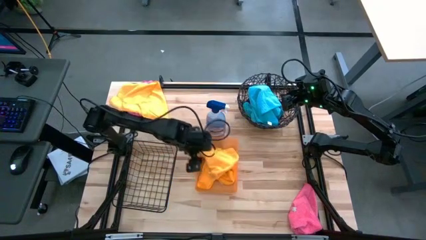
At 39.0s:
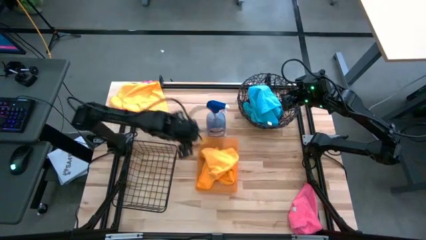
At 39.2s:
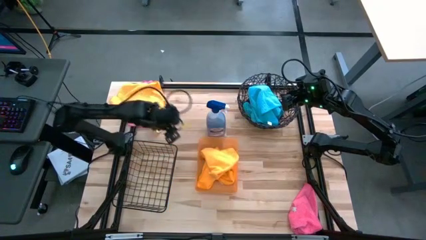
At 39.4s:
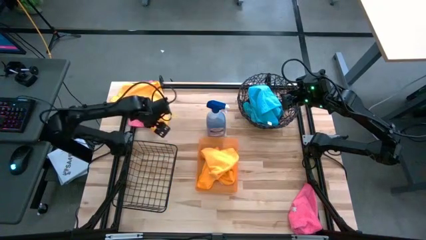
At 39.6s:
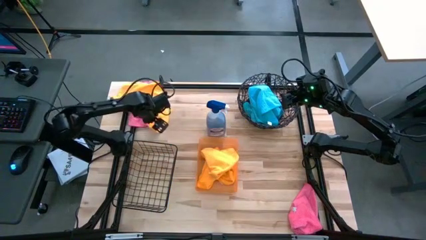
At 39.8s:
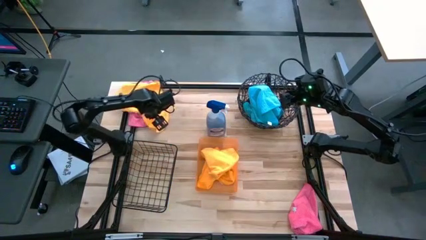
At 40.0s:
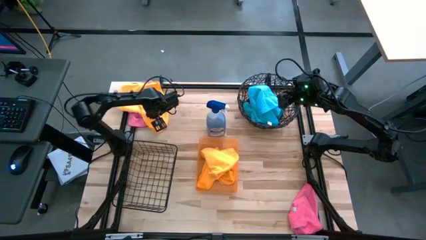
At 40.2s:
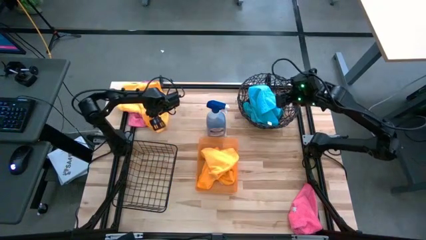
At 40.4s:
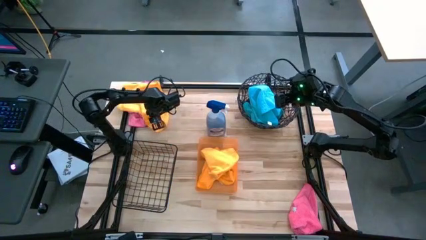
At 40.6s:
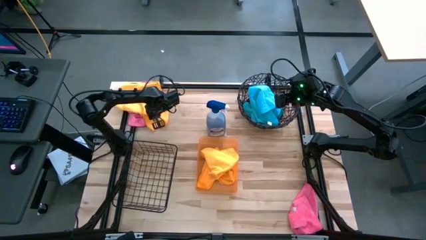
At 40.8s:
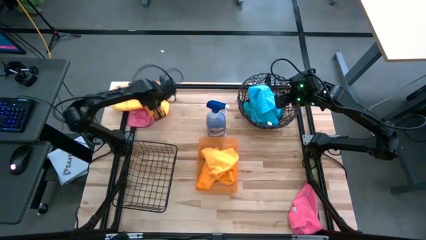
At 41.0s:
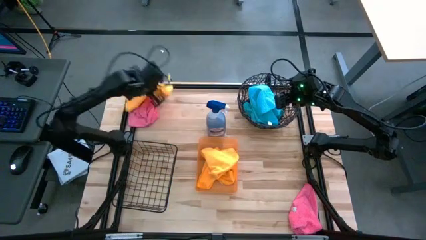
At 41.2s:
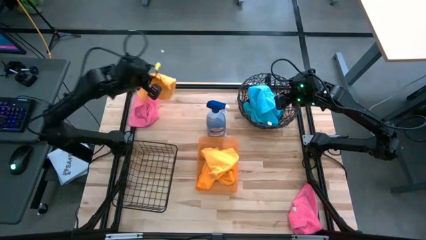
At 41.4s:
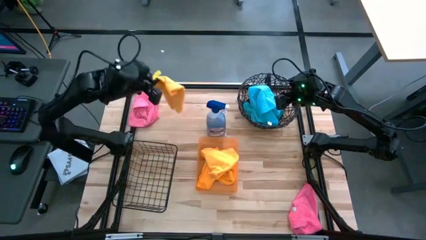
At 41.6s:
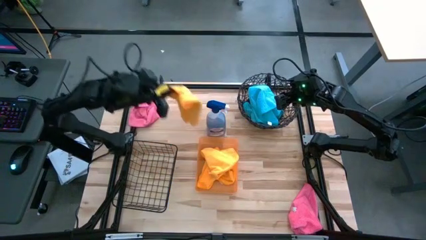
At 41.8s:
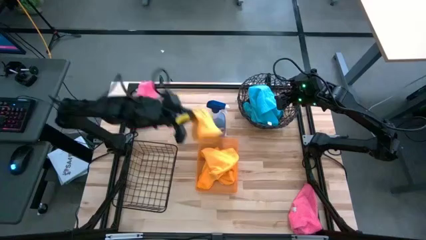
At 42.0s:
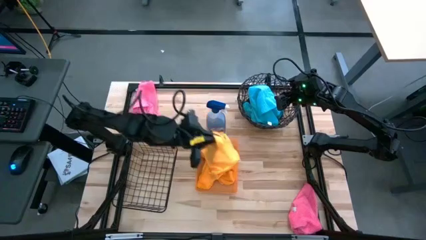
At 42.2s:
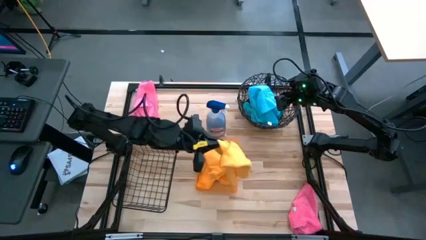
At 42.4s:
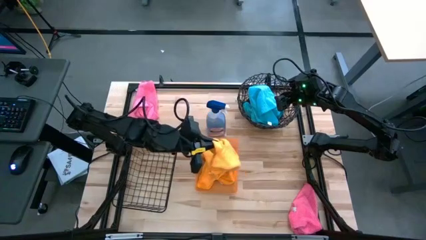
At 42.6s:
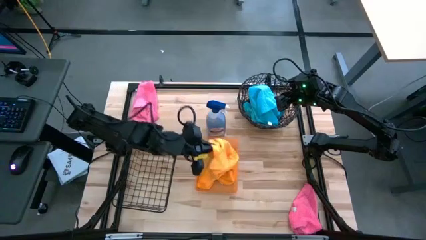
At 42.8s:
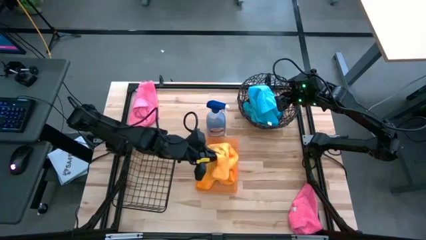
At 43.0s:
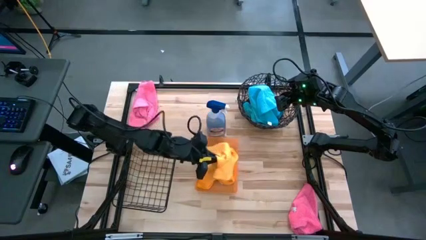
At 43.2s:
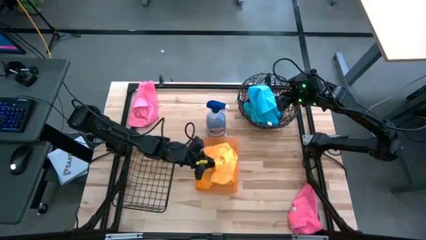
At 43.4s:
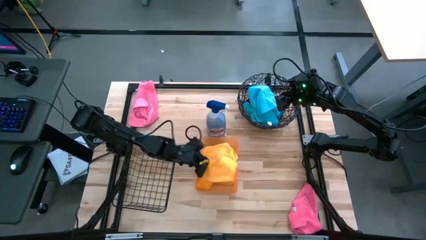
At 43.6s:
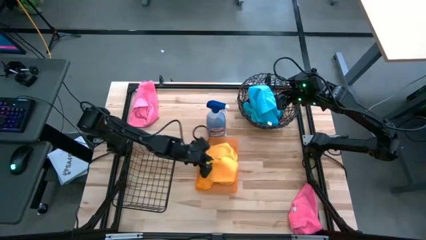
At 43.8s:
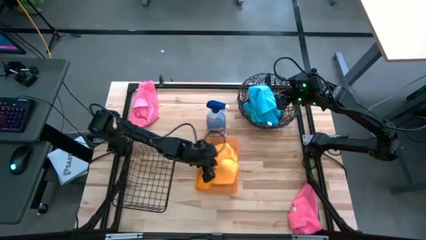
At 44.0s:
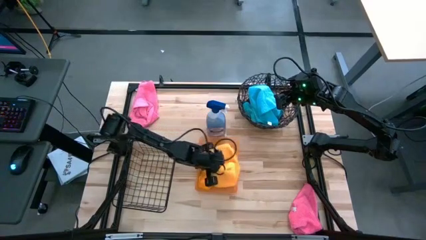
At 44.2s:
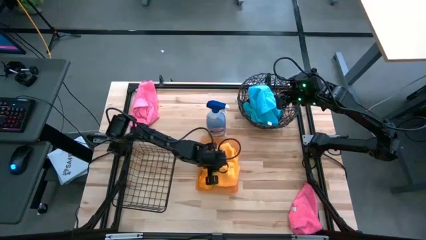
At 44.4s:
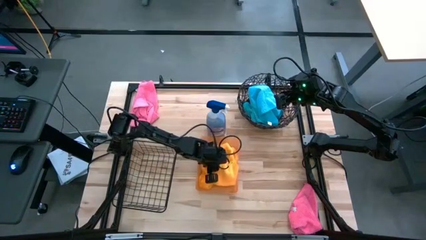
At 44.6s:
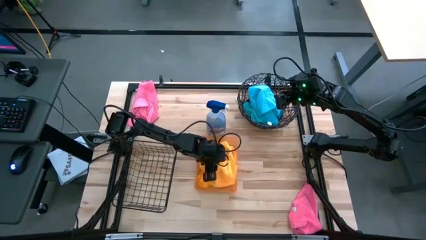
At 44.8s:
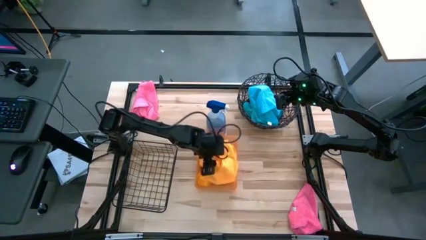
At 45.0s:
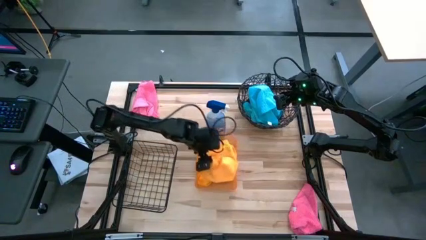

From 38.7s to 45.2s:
Task: Sort microfiber towel by color & place in baskets
Put the yellow towel into the orange bin

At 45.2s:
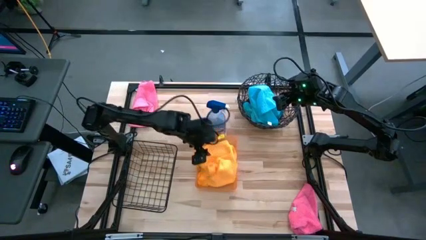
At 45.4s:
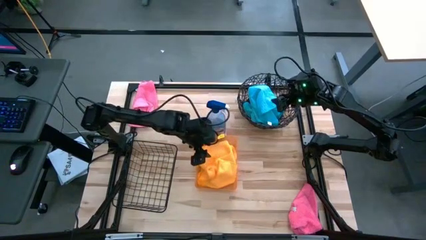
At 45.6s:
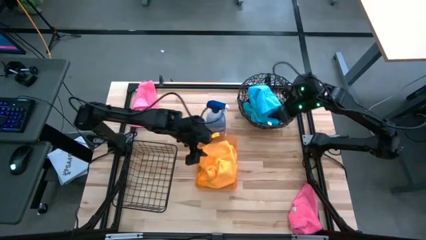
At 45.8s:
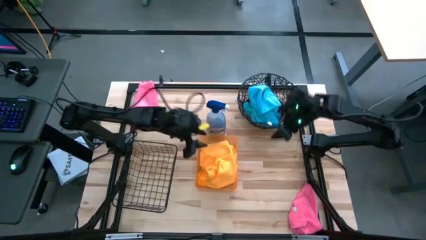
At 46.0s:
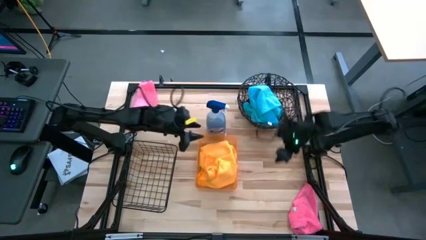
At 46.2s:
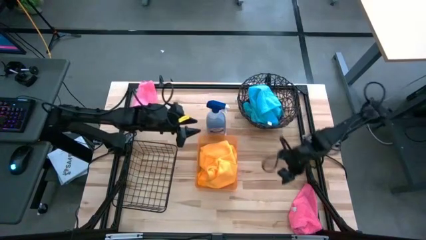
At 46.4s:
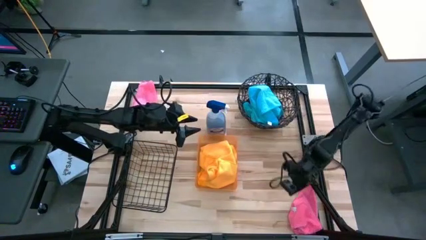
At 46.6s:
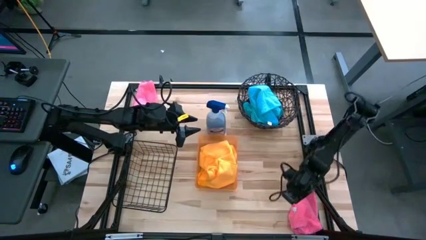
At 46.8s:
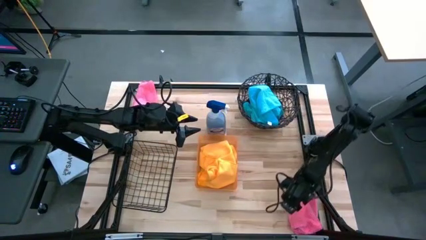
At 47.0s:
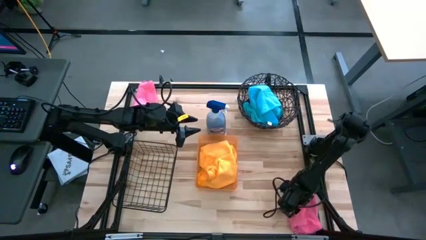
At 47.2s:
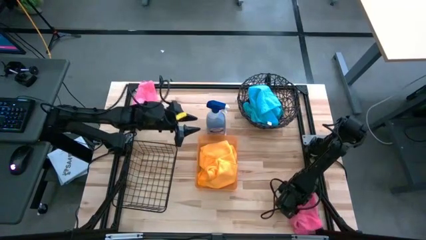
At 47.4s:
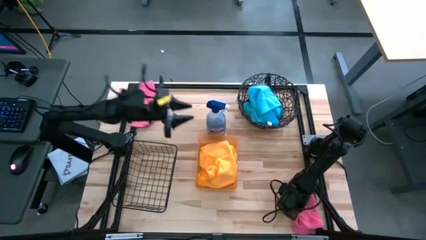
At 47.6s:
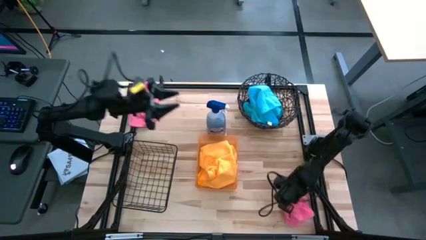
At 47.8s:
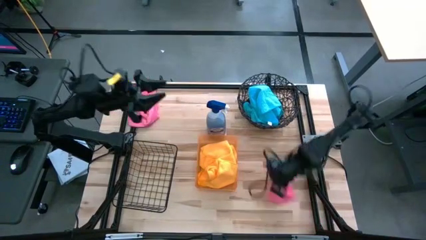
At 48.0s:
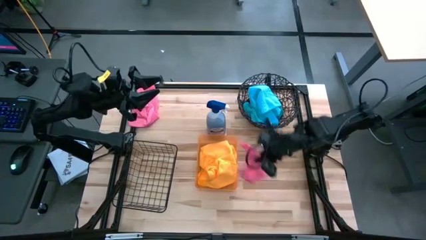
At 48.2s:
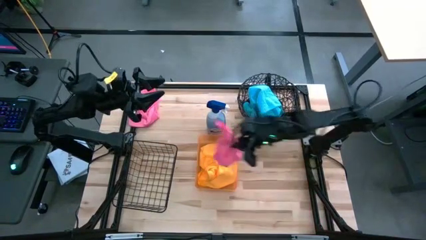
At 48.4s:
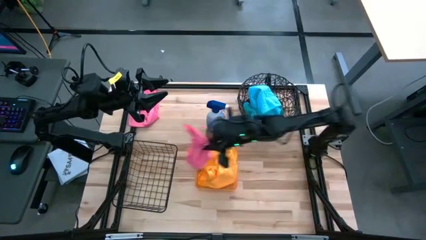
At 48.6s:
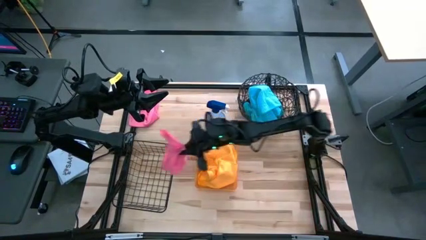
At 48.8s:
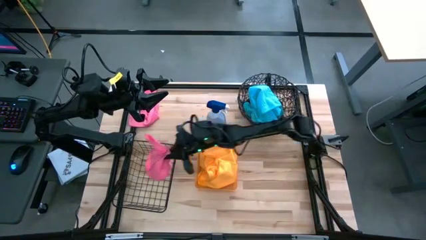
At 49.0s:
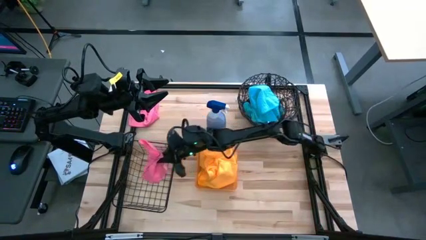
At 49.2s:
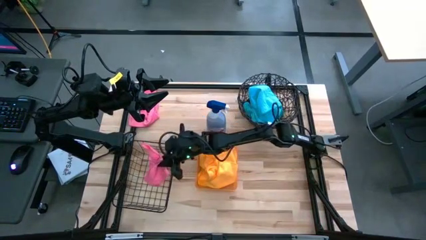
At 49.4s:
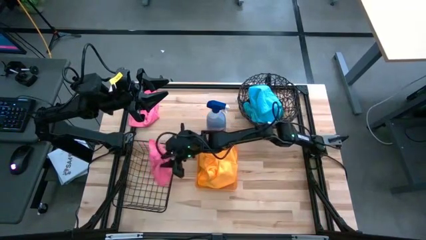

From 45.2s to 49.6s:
Put the bottom pink towel into the black wire basket

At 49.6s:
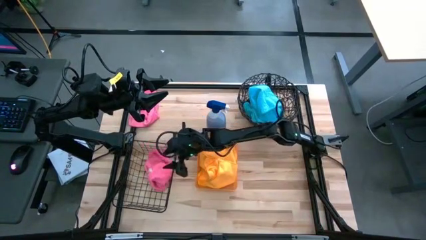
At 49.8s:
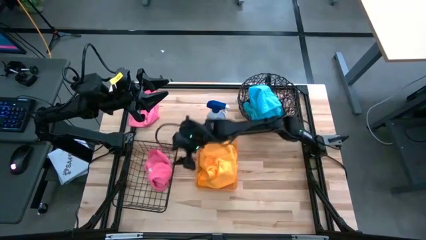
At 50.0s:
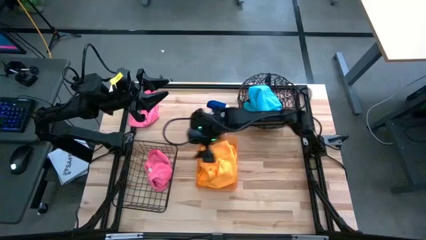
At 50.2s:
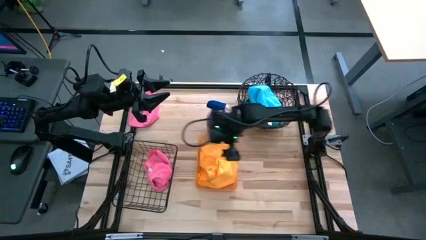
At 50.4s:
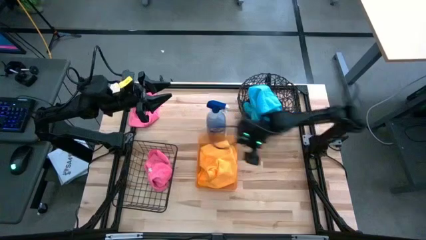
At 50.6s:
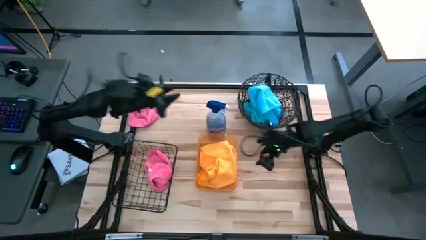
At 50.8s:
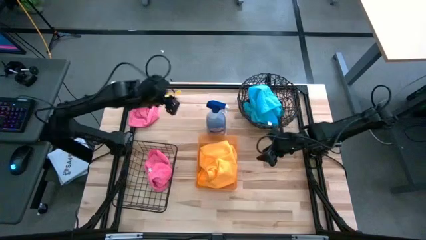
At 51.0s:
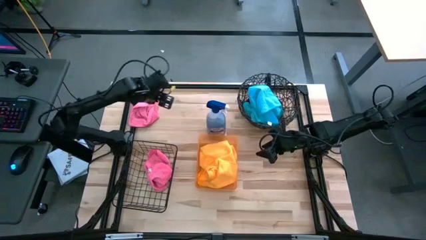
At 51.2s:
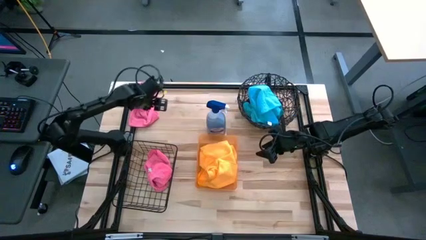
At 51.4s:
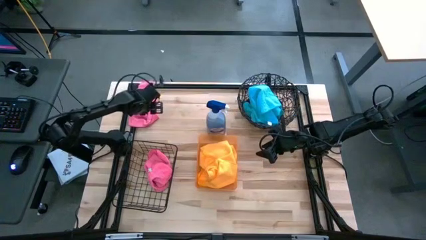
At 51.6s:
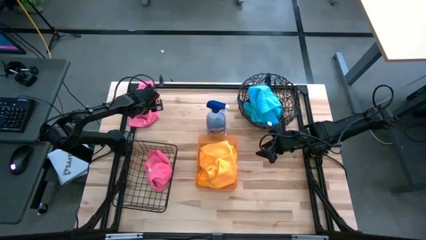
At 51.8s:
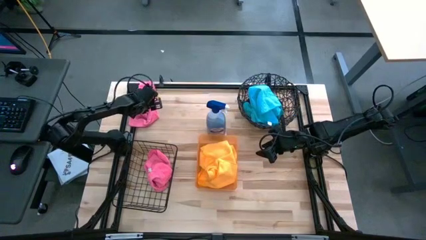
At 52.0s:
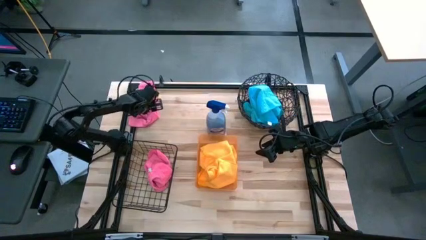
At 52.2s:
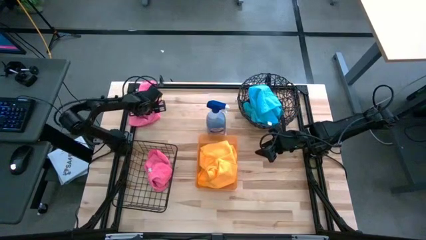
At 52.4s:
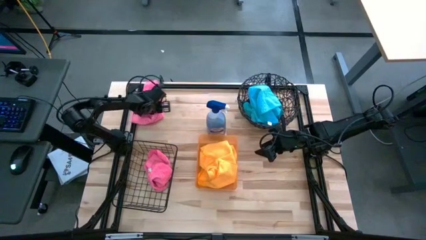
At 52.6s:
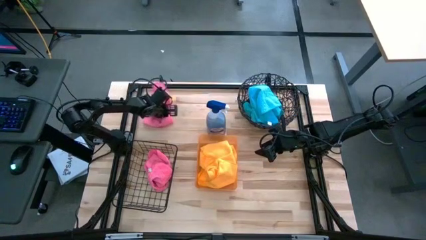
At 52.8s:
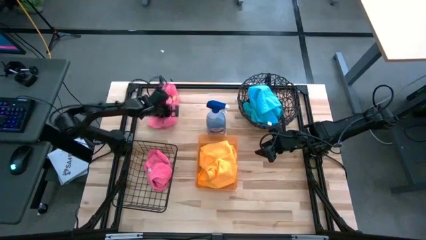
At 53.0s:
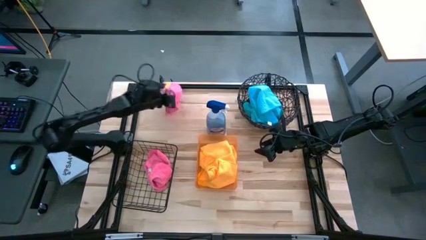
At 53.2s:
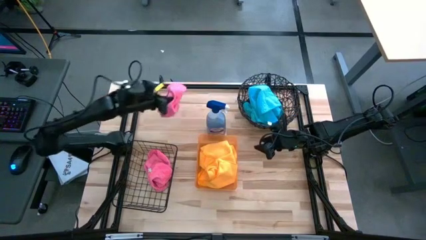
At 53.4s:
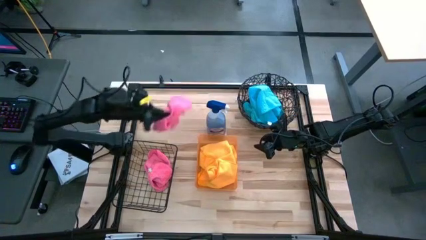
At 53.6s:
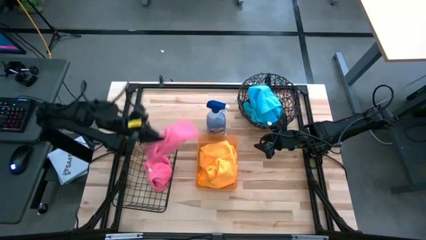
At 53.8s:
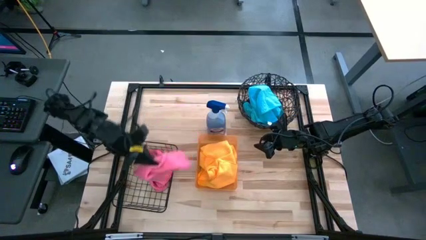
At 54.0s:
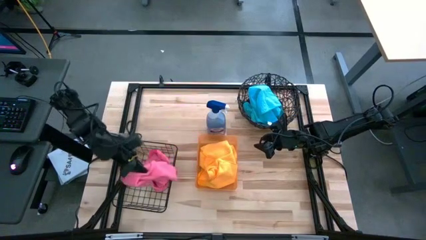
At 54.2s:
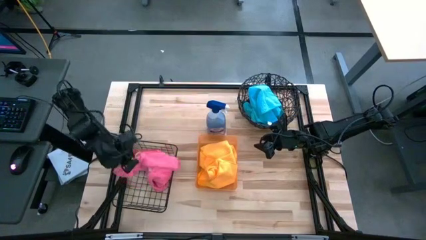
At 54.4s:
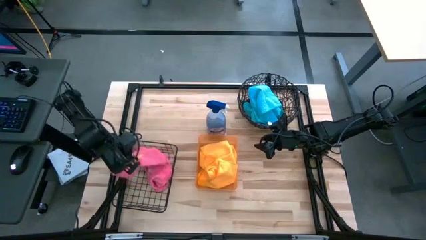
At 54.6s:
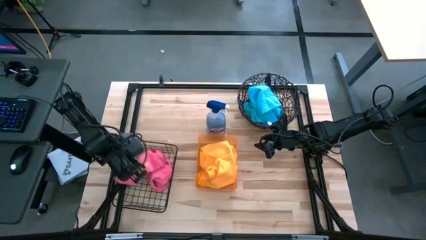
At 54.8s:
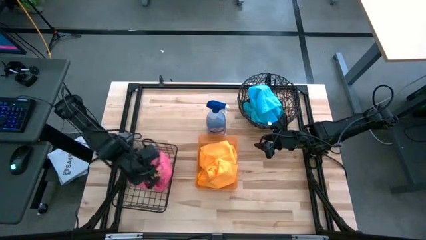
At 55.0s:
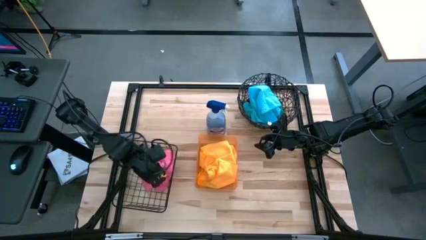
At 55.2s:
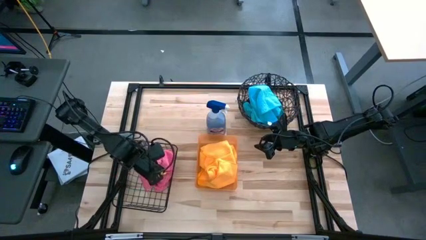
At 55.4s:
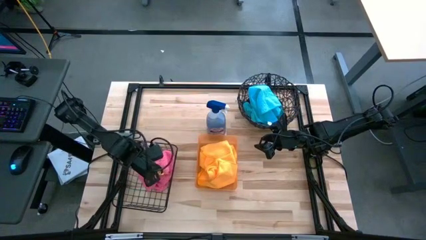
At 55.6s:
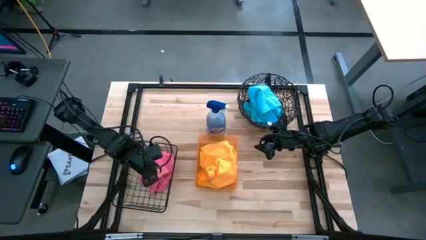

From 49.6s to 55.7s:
Put the pink towel into the black wire basket
